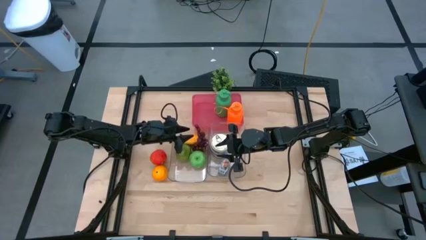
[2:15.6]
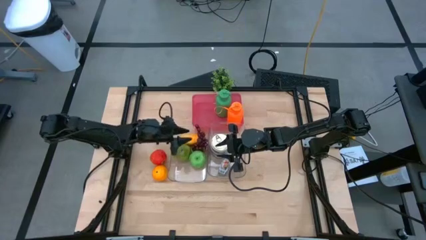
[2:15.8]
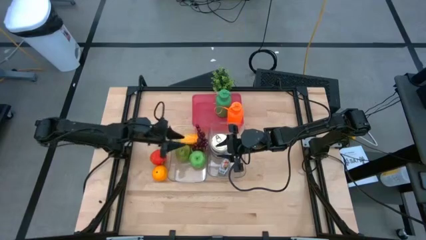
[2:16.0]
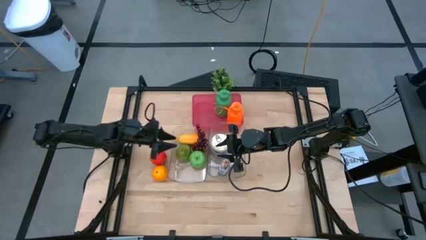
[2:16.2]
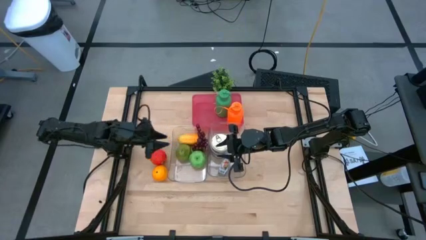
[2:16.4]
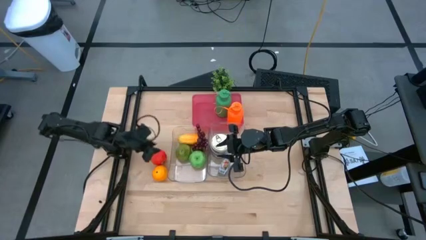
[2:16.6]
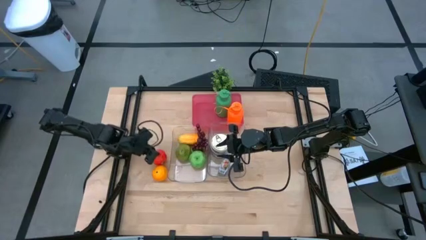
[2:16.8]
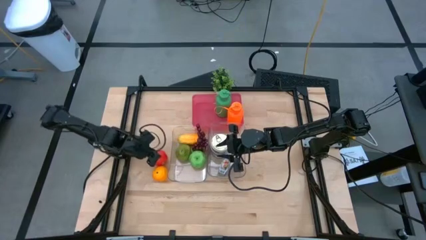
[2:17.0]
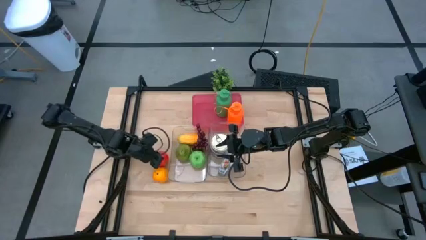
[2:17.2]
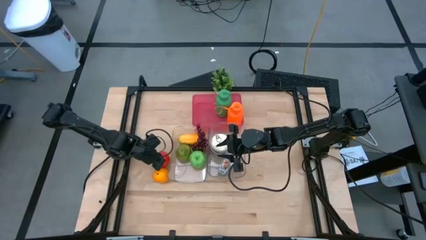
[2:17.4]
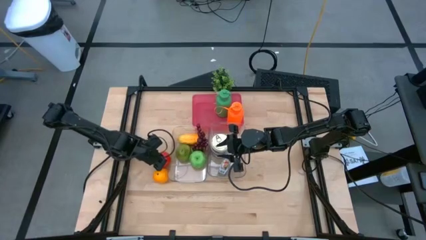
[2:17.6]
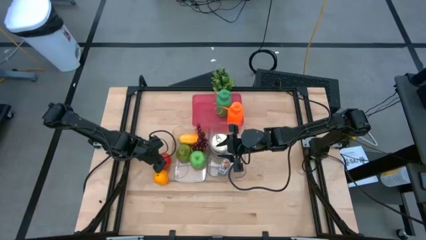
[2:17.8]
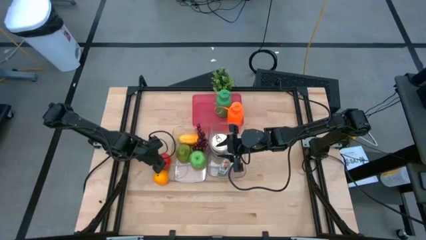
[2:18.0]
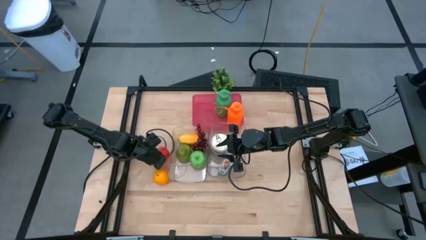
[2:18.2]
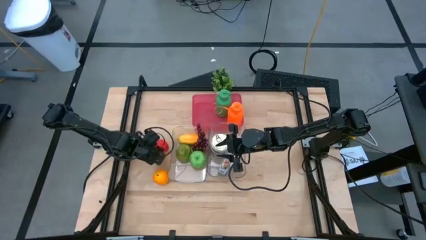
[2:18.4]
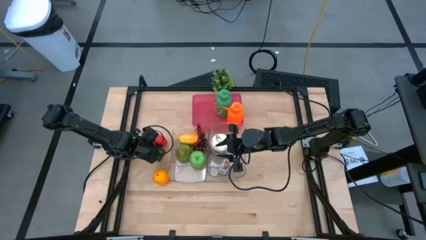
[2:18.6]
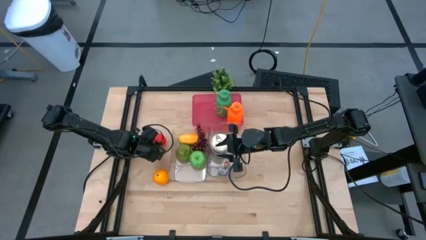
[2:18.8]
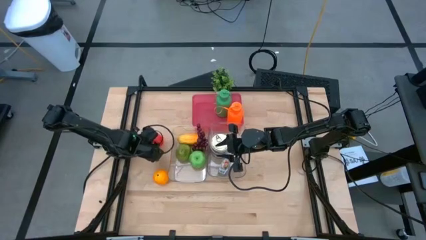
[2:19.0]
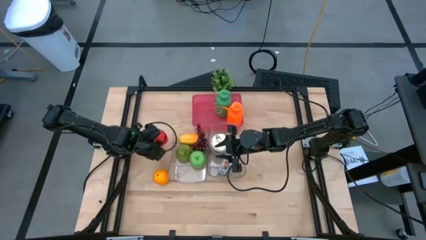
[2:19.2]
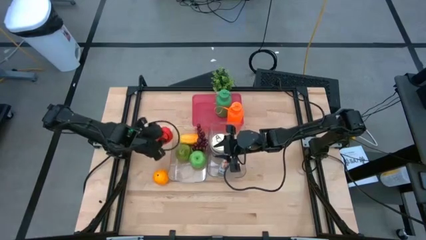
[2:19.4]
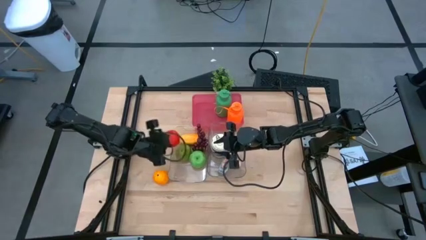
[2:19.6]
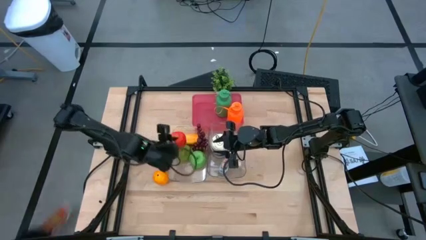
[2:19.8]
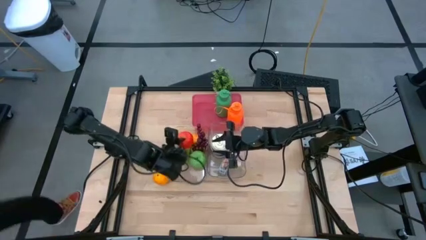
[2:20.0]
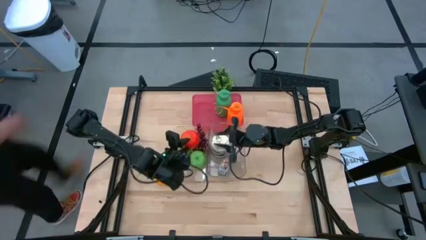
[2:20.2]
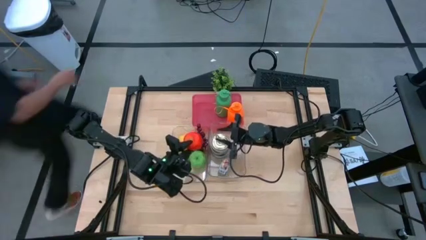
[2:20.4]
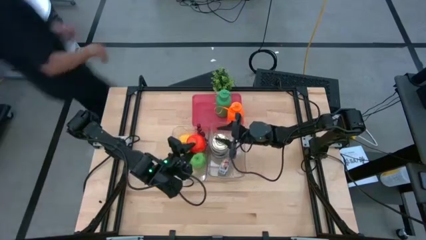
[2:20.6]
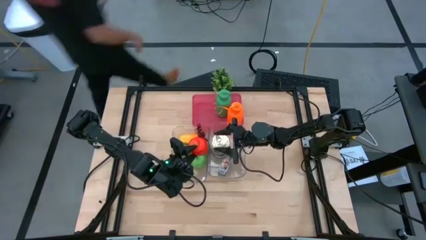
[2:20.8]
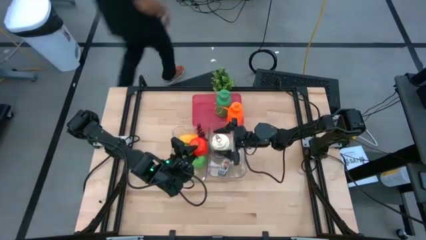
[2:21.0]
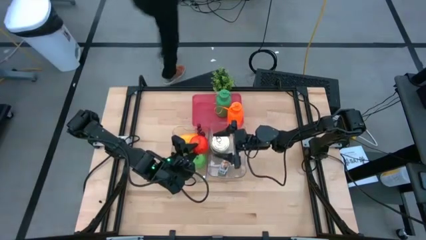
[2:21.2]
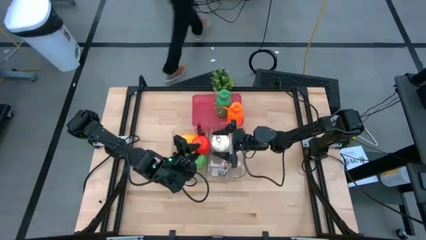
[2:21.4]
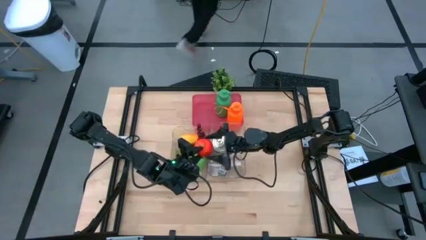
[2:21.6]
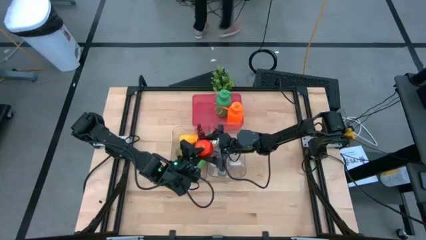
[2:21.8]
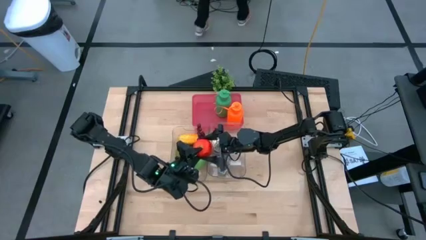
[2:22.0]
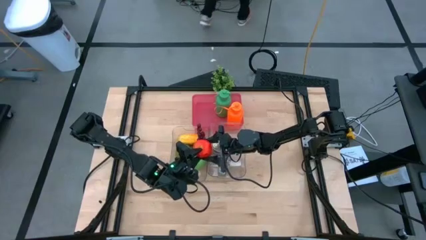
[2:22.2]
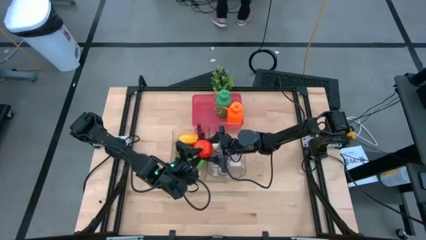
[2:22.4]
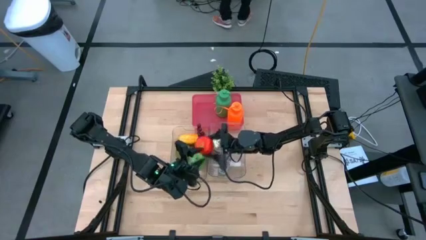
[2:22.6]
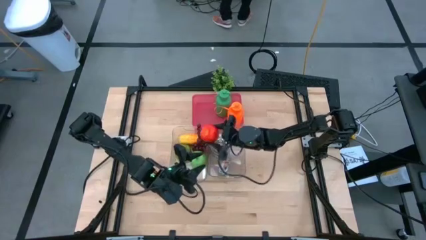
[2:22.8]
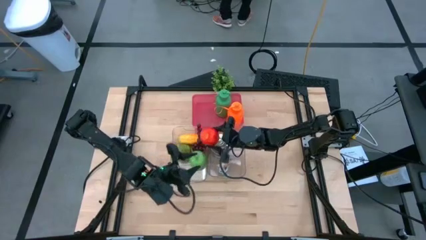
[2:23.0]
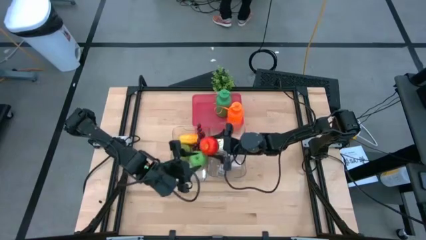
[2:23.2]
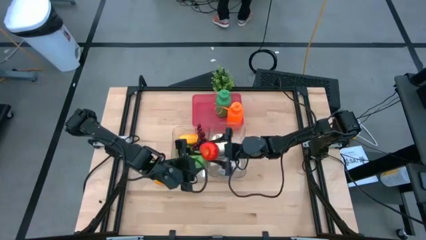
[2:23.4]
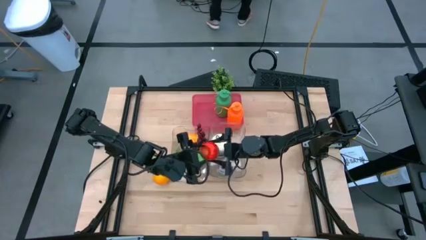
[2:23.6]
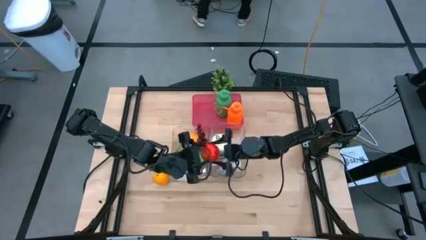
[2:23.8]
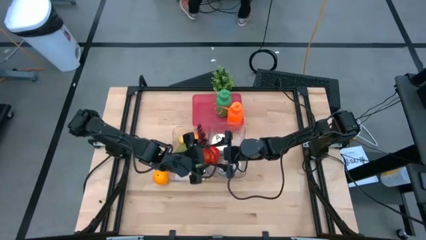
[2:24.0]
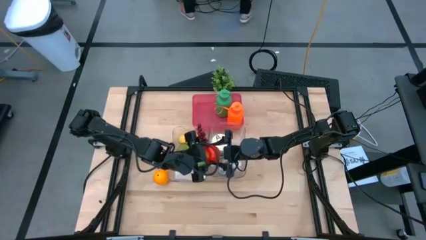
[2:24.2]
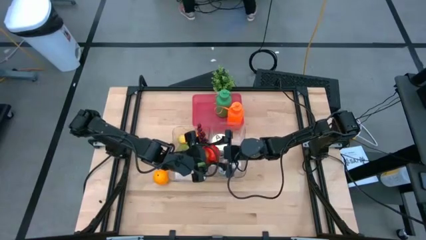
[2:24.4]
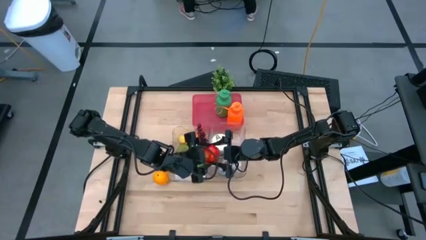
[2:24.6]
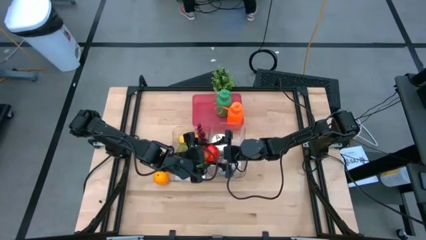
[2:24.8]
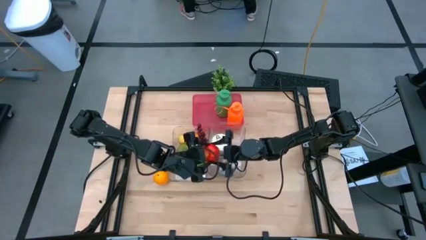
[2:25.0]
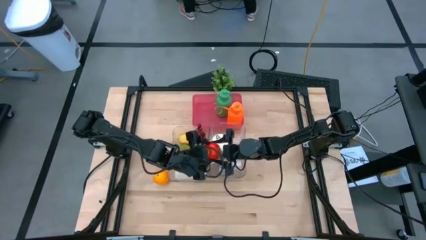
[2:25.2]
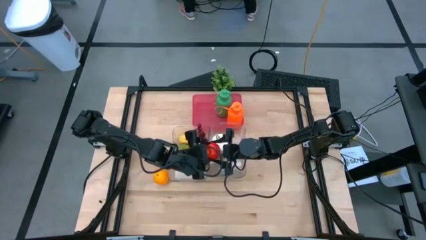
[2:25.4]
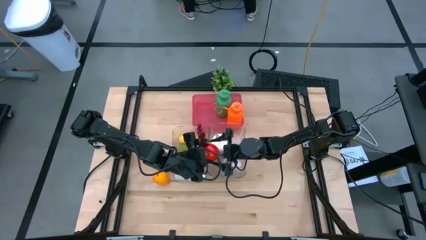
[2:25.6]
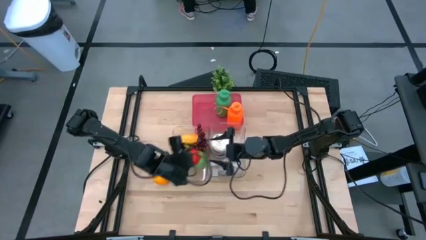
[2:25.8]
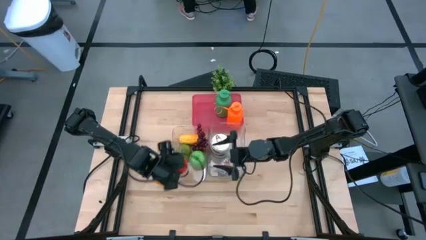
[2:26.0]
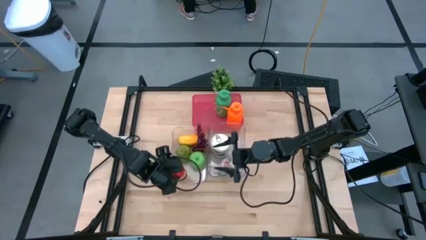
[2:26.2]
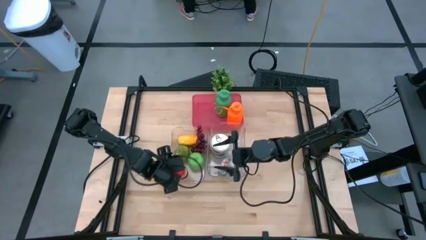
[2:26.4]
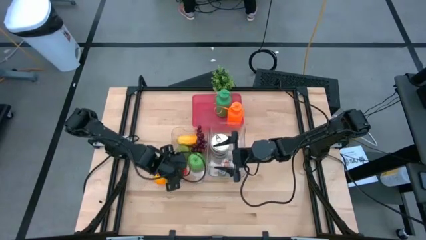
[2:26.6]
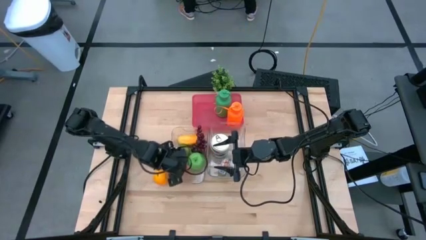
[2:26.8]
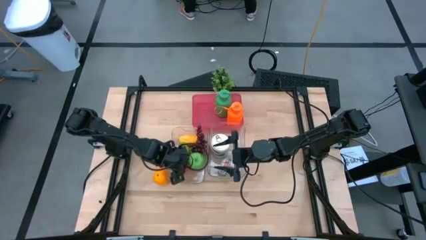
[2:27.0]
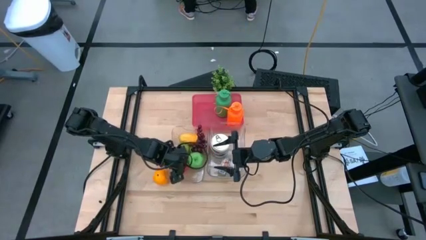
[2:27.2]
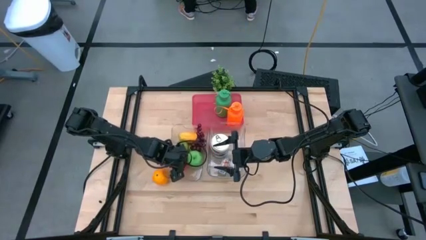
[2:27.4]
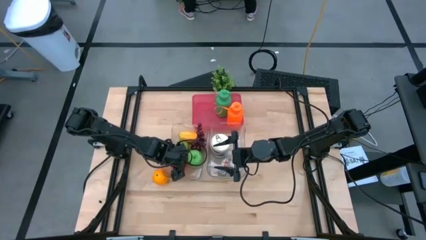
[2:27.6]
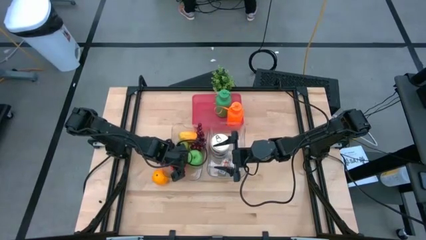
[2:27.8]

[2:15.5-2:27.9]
Task: Pick & Place Food Item
Put the red apple into the left transparent bin

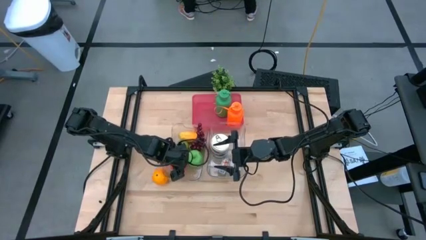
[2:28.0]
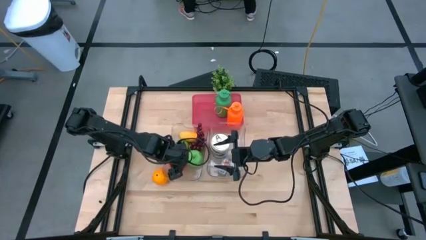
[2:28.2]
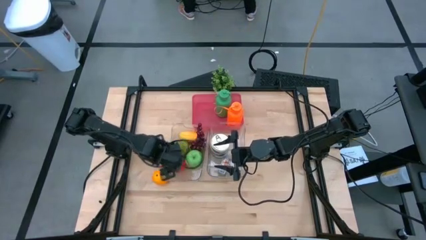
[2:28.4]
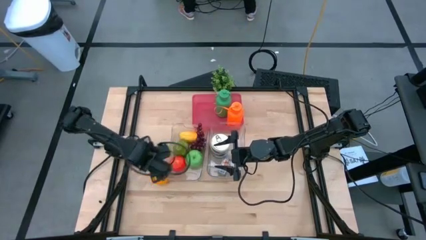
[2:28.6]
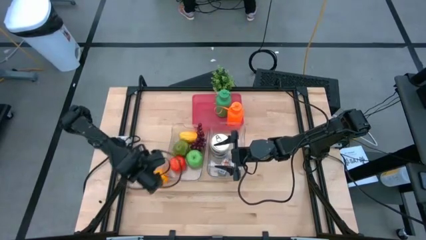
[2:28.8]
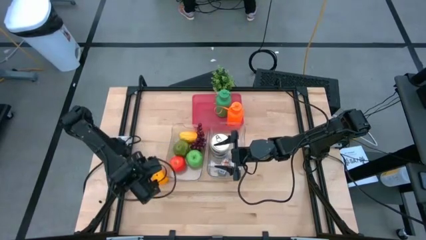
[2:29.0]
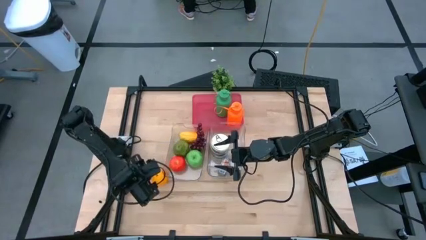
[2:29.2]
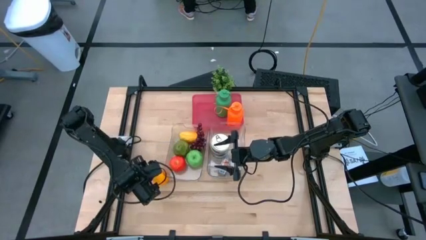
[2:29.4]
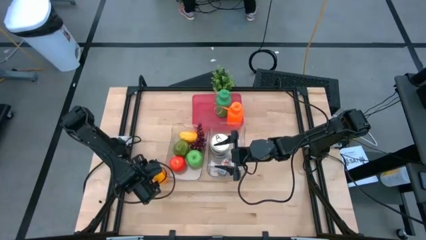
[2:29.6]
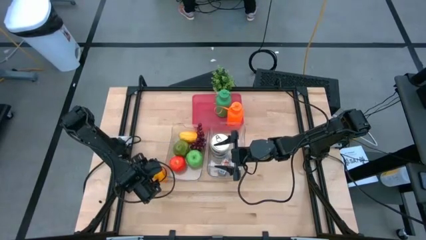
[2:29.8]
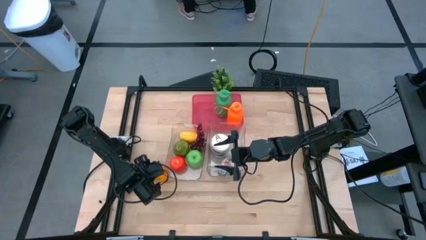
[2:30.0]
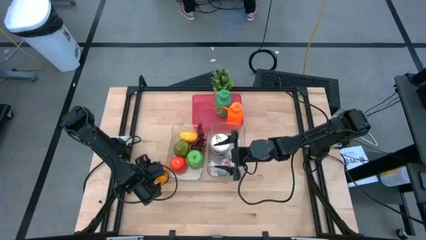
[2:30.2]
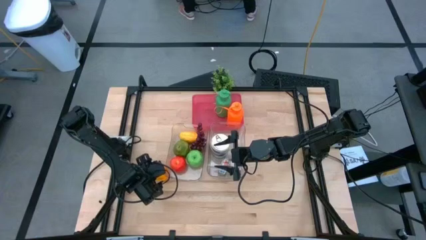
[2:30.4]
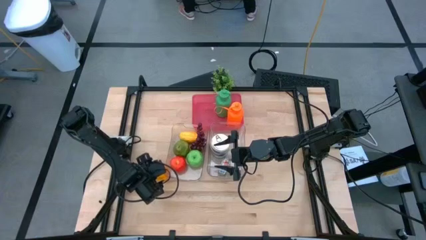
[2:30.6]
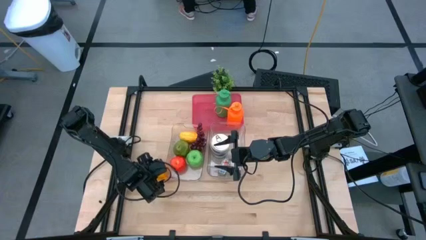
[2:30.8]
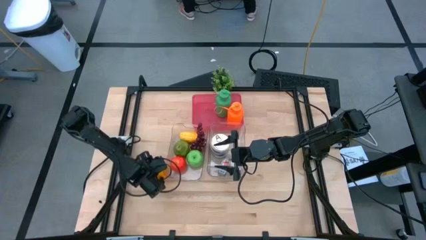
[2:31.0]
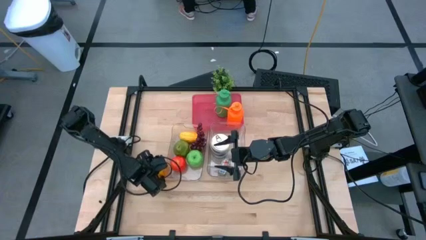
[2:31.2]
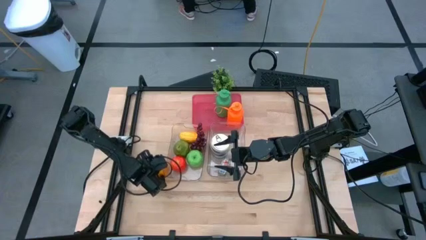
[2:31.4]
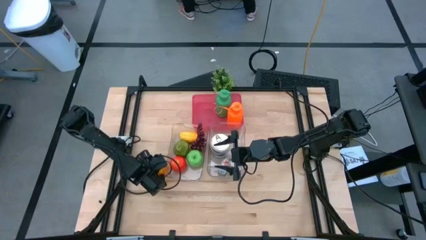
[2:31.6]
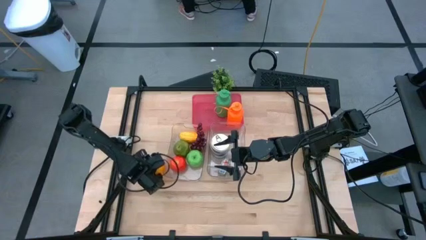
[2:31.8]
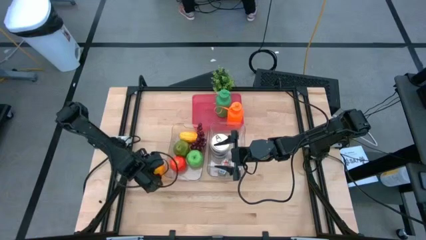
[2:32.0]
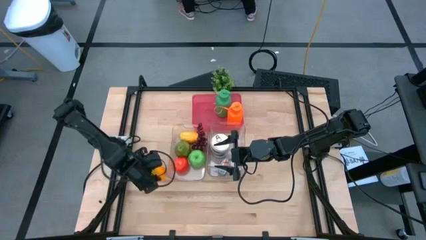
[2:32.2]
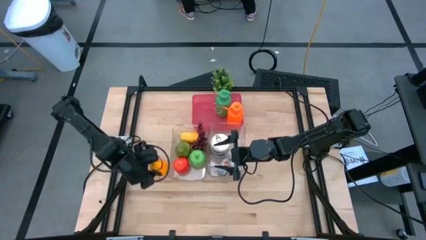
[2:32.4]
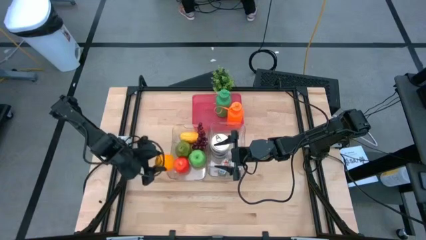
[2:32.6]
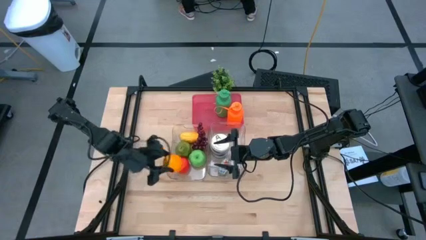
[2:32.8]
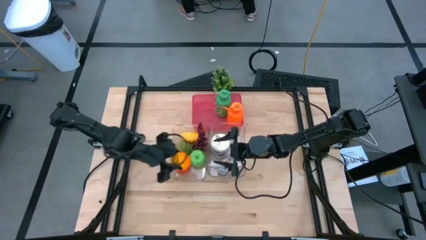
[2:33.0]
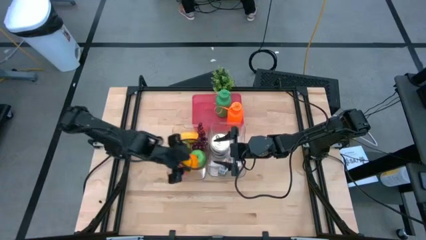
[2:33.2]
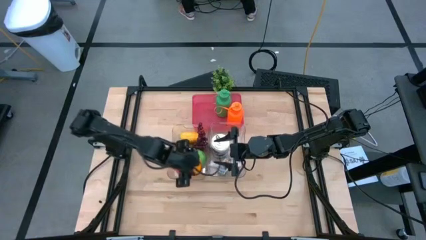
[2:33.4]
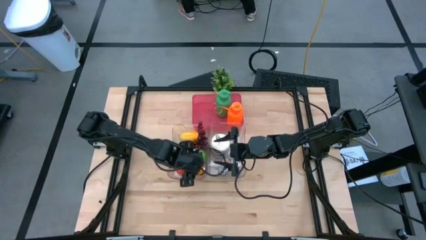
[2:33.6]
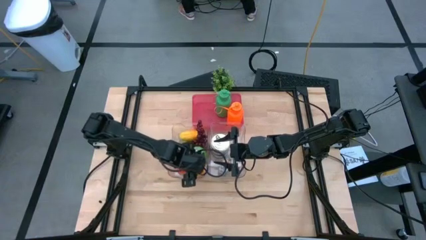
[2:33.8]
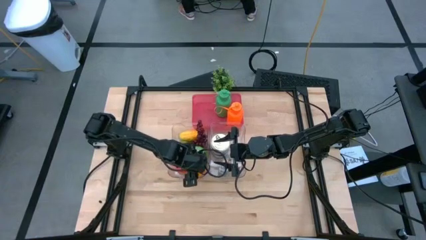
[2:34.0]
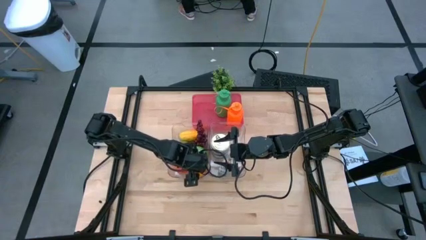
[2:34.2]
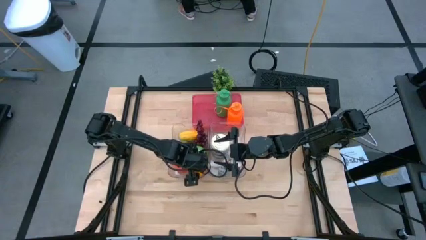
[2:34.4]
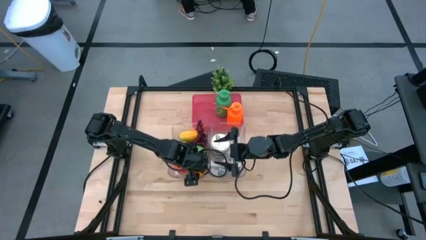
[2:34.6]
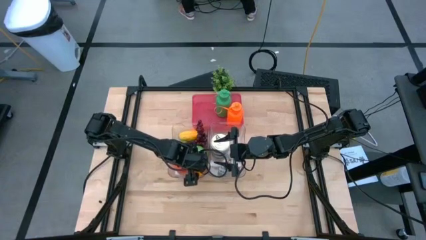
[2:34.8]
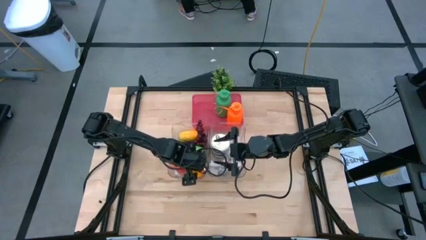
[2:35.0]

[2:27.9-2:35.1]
Put the orange into the left transparent bin
